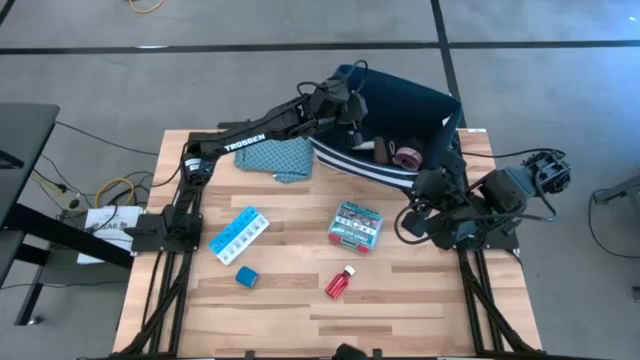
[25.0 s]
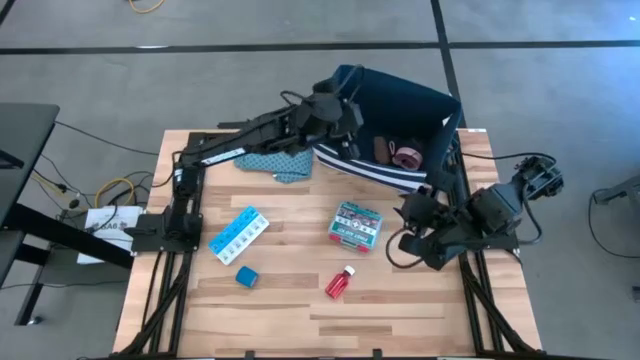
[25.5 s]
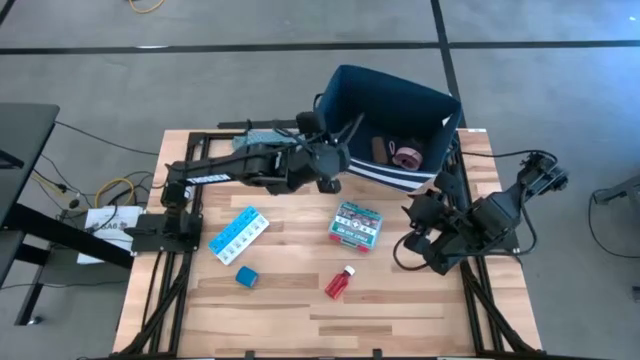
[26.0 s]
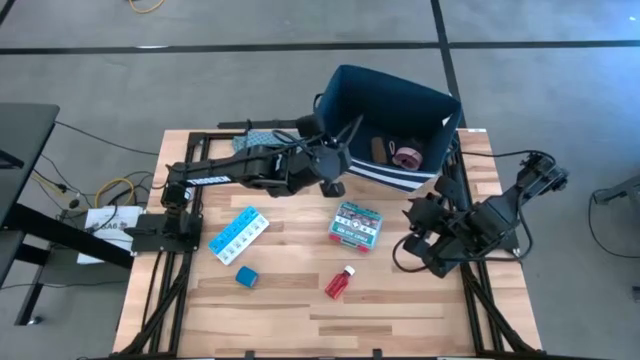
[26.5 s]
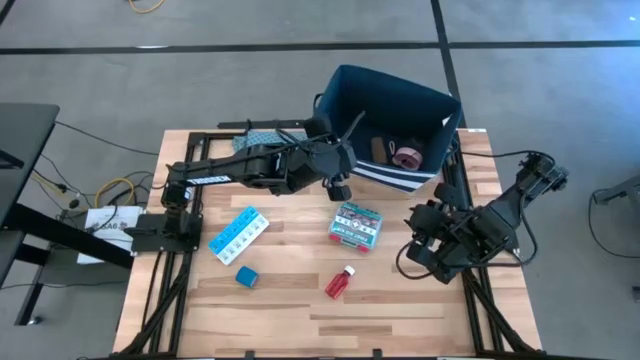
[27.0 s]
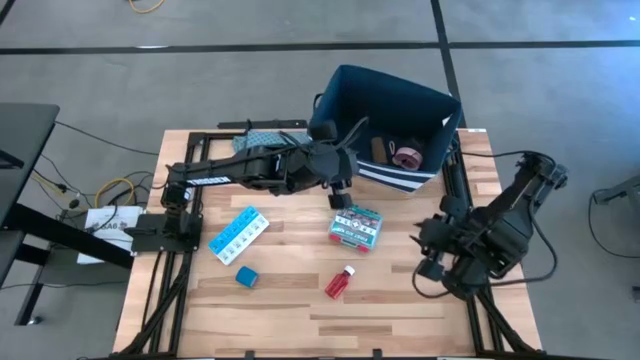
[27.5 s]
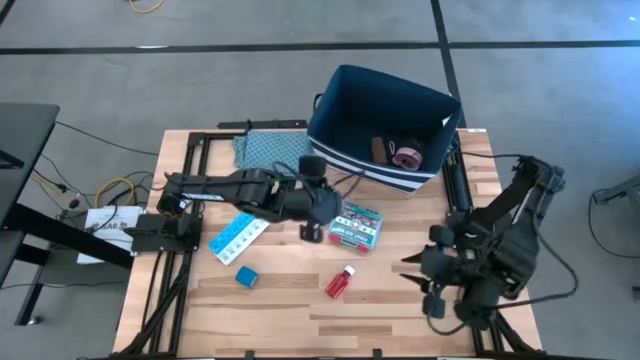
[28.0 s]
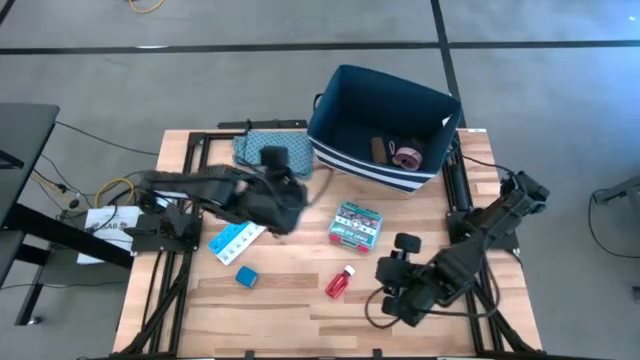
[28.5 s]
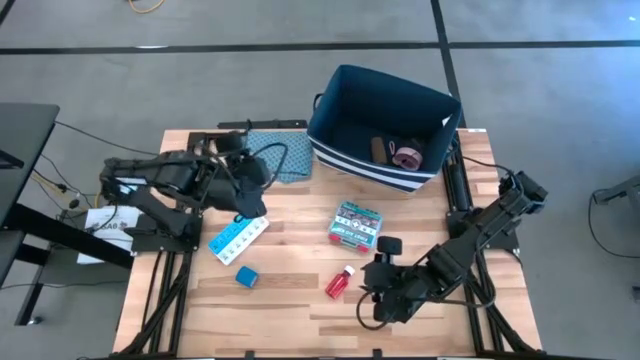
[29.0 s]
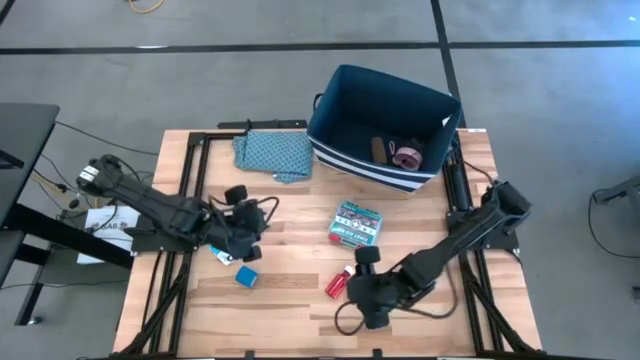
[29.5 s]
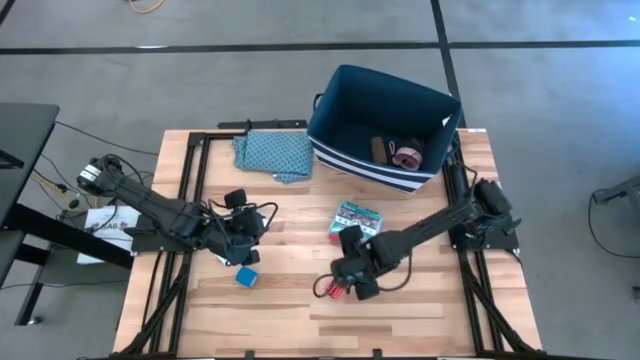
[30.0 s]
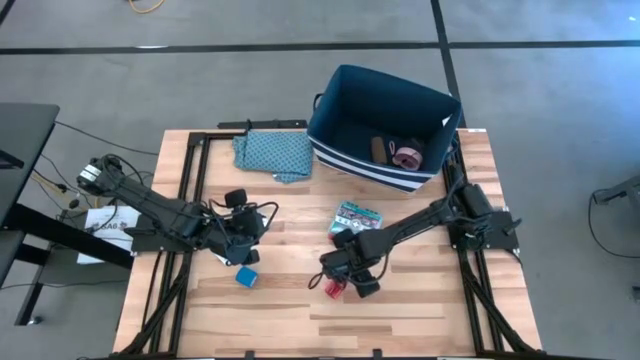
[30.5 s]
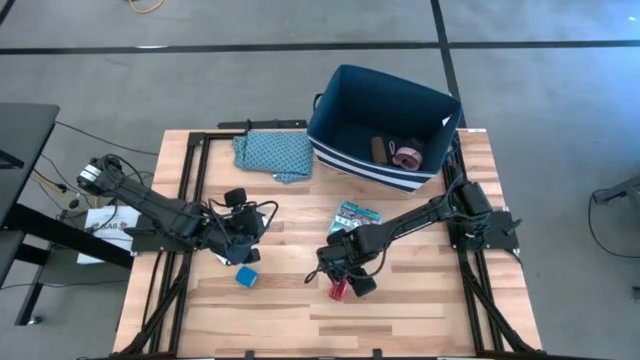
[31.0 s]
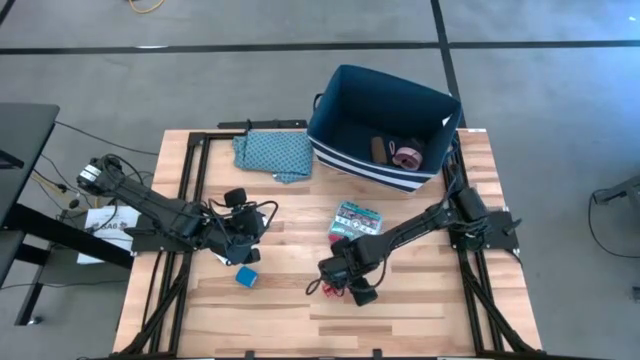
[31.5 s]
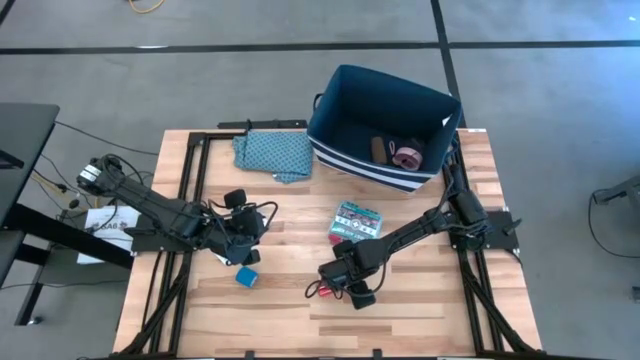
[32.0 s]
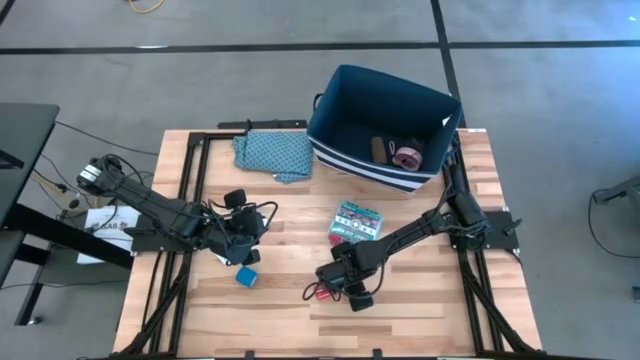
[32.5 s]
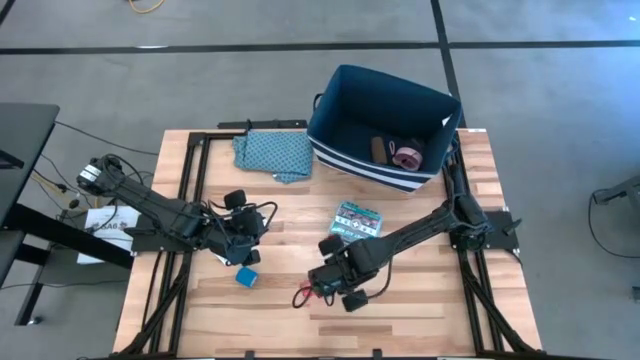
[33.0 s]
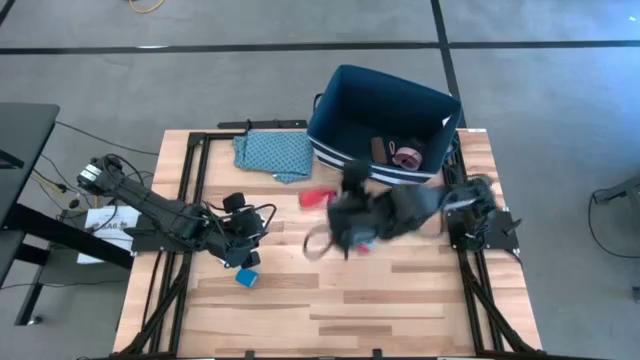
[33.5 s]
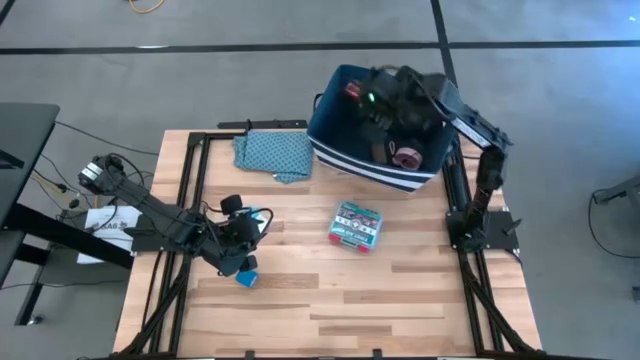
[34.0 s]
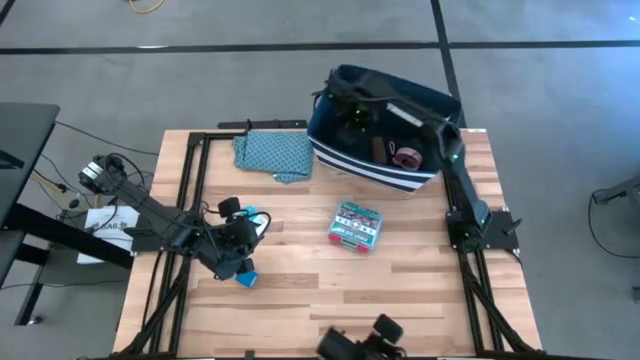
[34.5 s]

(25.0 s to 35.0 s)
Task: Pick & place medical supplies in basket/bin
Put the orange pill bottle into the blue basket

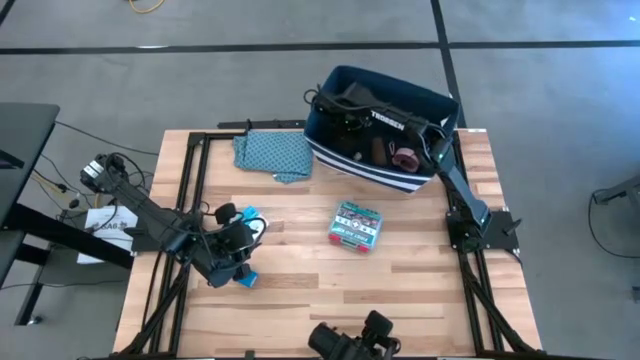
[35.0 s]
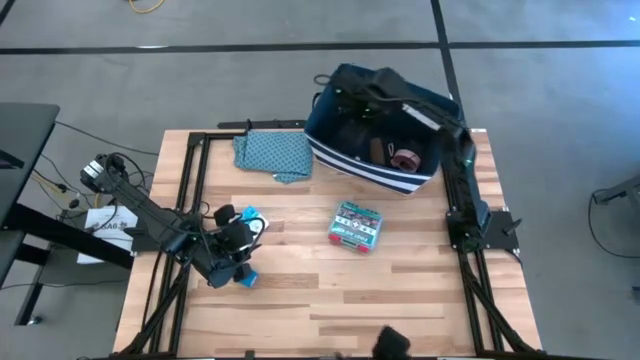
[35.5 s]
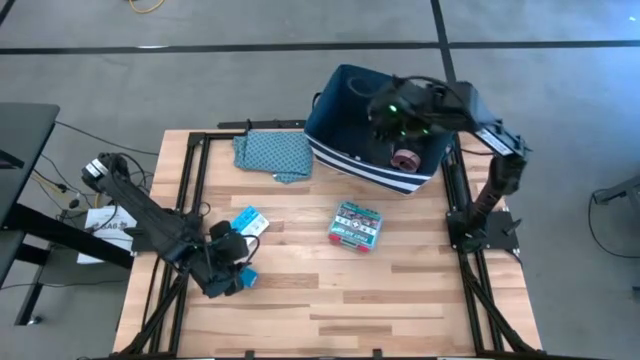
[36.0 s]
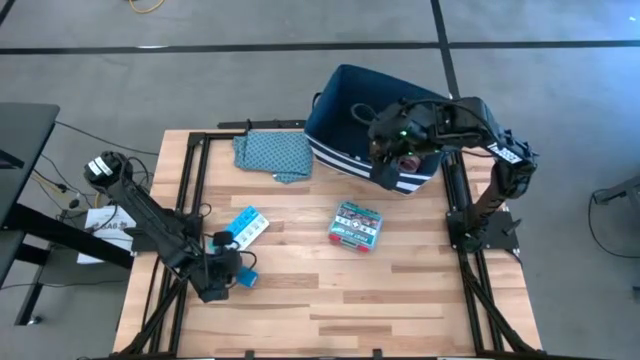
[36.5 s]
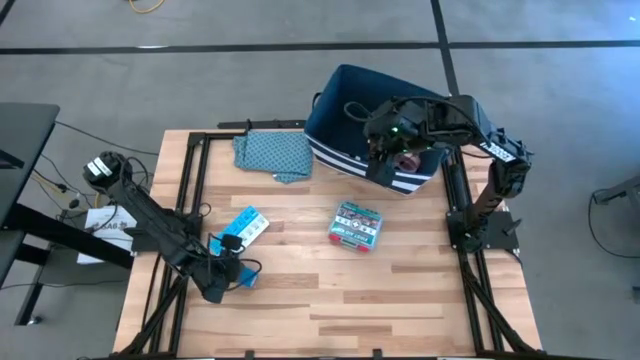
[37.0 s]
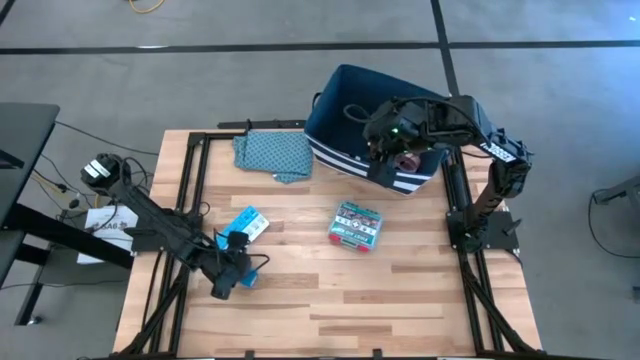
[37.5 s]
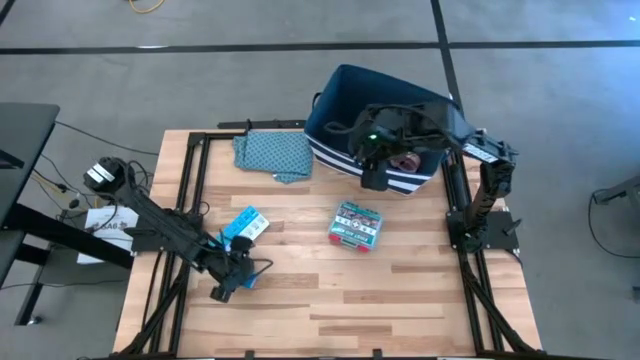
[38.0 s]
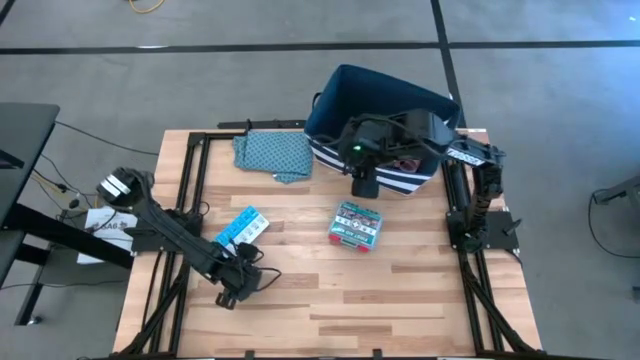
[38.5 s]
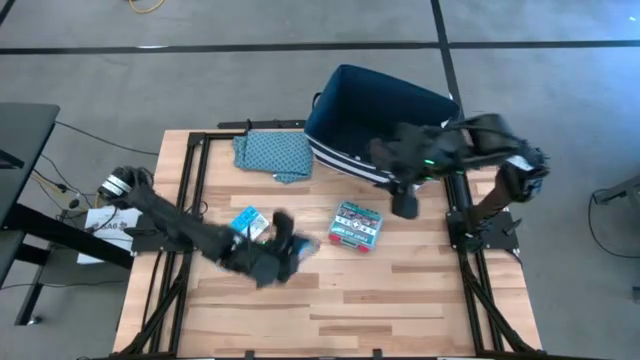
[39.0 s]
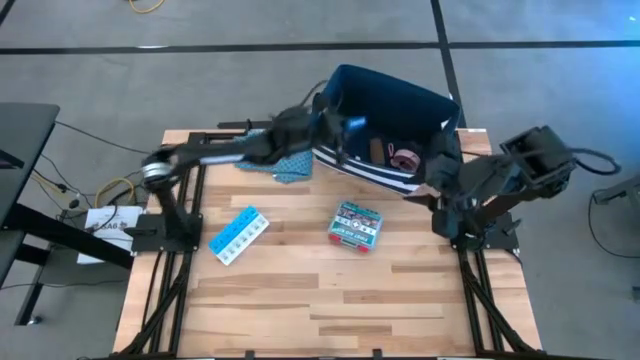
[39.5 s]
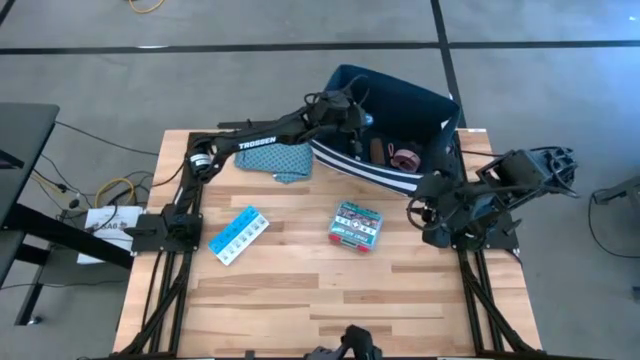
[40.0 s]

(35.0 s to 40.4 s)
Put the blue bandage into the blue basket

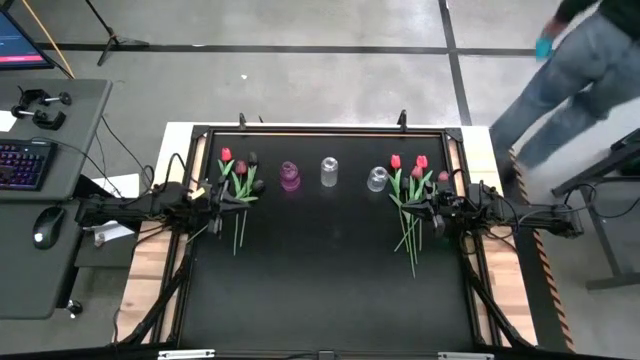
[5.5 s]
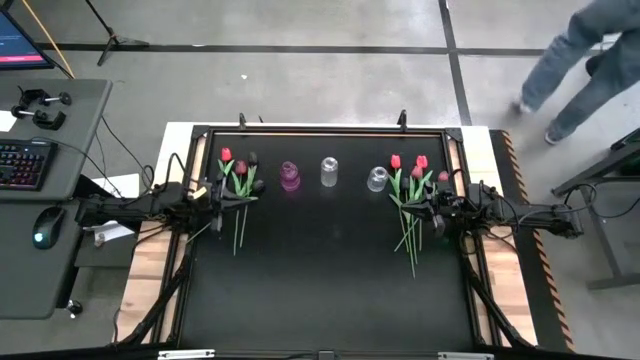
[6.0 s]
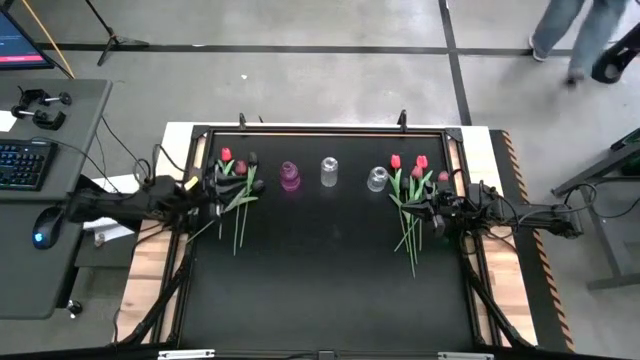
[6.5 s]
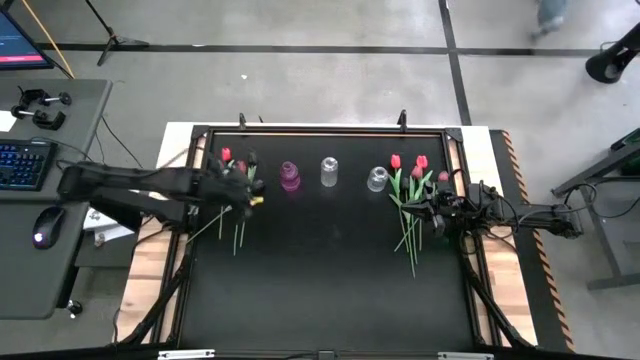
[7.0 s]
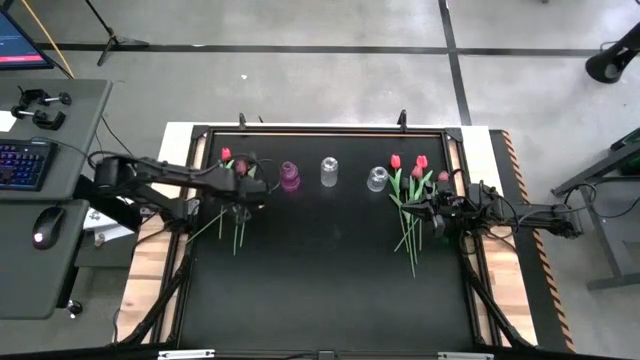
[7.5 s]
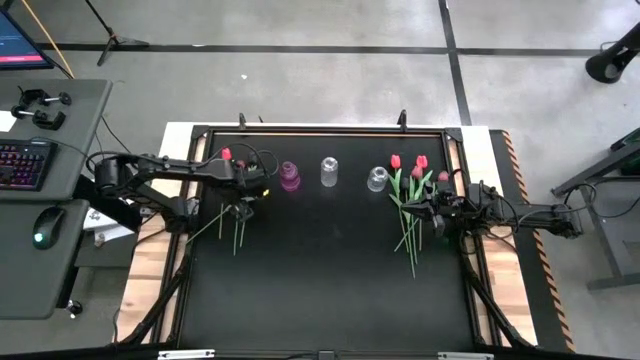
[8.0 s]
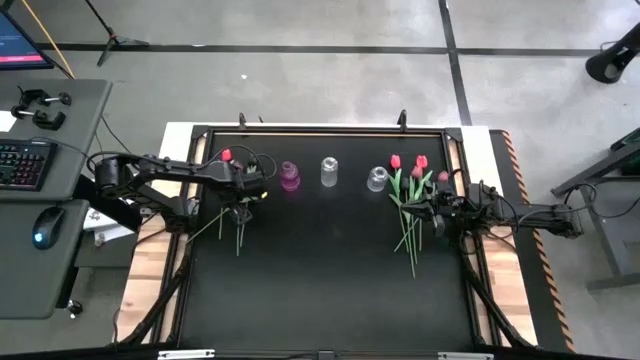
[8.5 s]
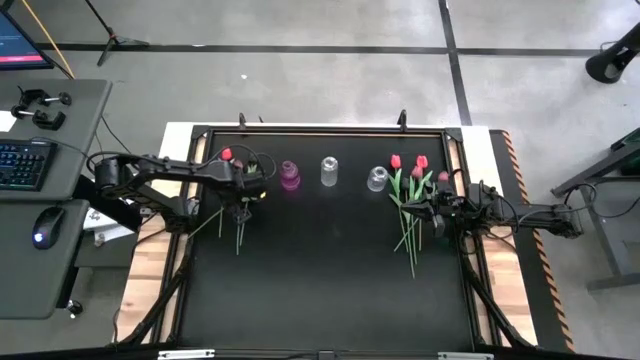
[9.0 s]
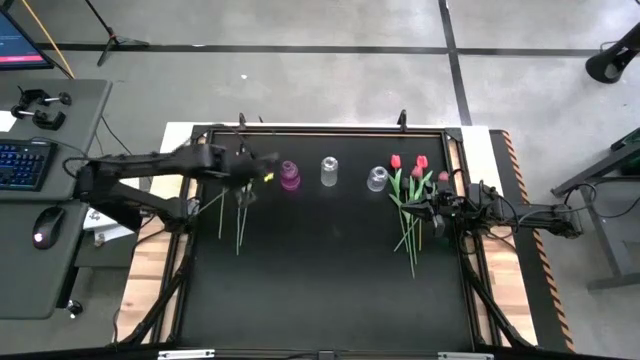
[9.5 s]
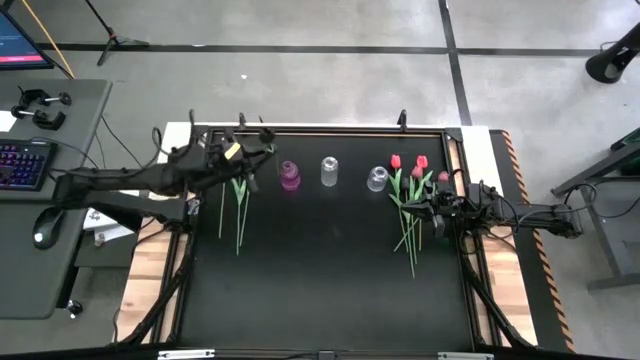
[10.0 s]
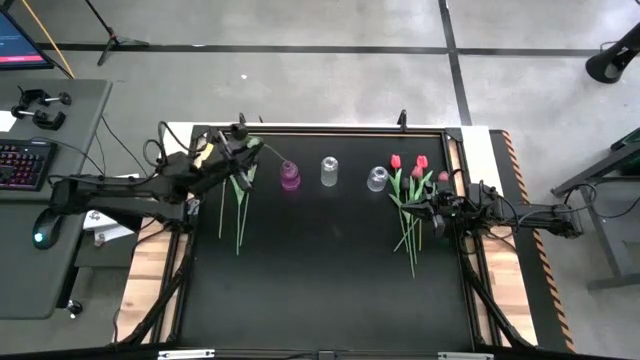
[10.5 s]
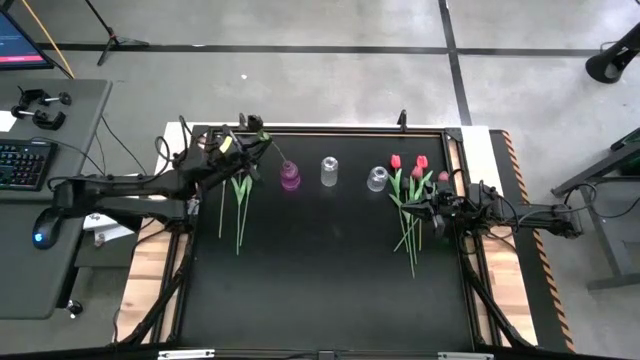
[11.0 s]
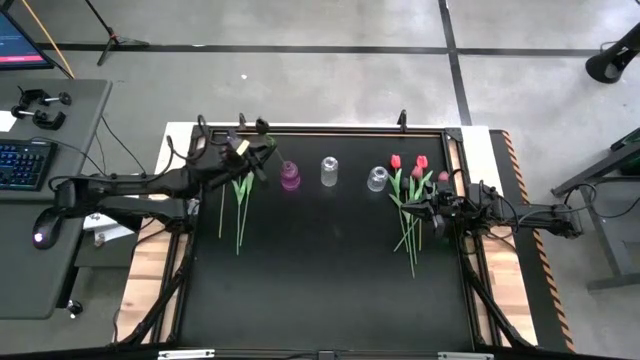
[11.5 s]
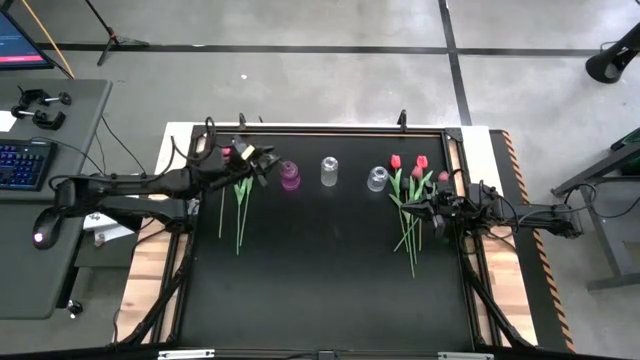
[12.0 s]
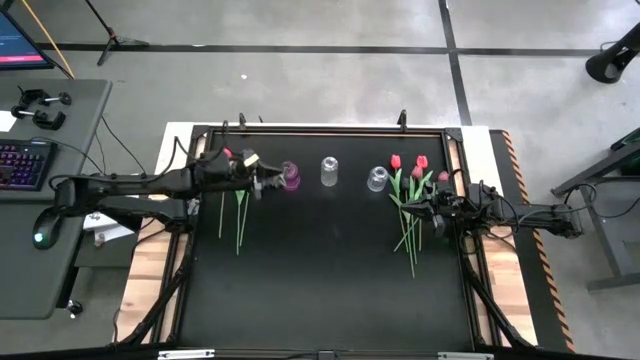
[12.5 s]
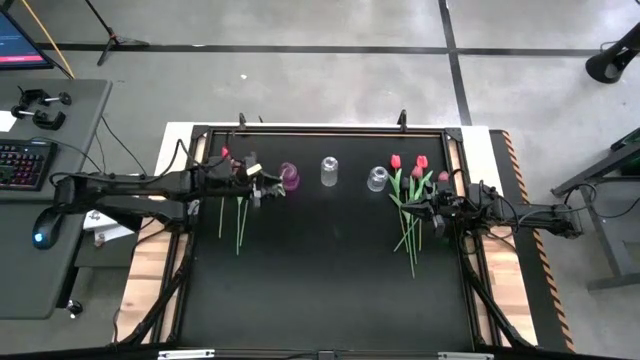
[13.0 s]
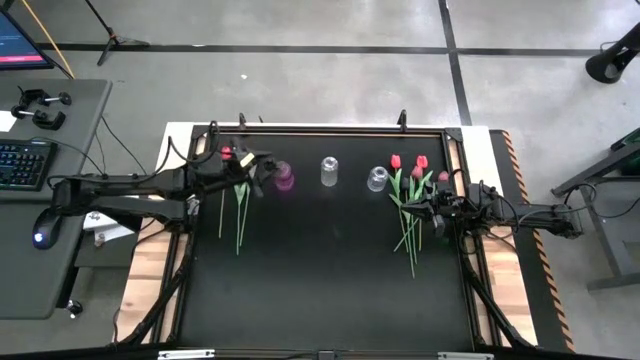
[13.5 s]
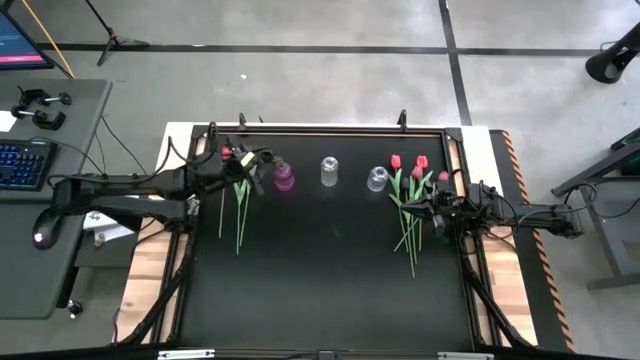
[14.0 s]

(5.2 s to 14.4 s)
Task: Sort flowers into vase by color
Put the left black tulip into the violet vase
